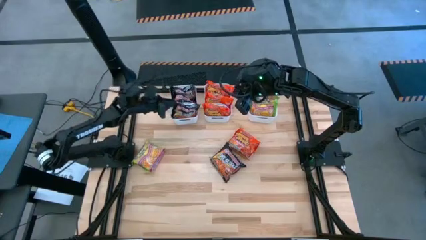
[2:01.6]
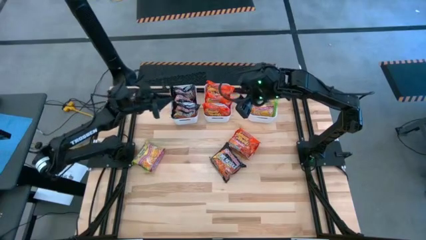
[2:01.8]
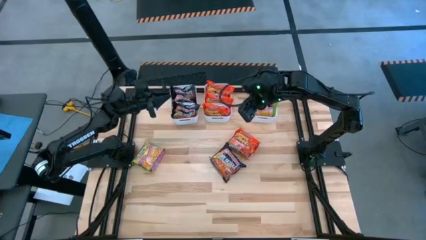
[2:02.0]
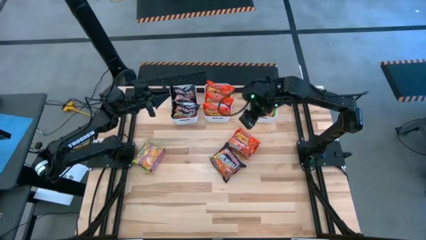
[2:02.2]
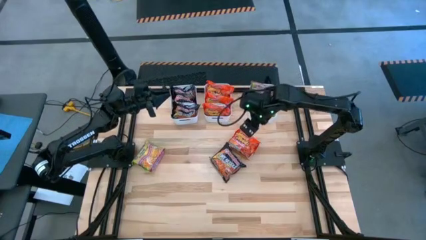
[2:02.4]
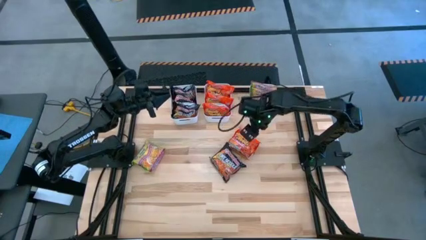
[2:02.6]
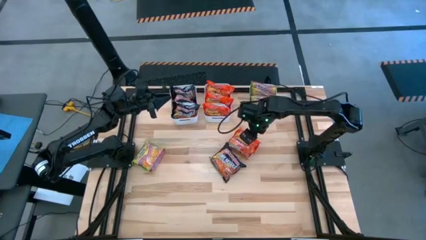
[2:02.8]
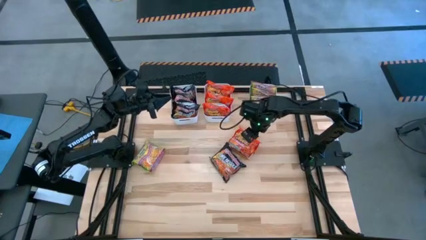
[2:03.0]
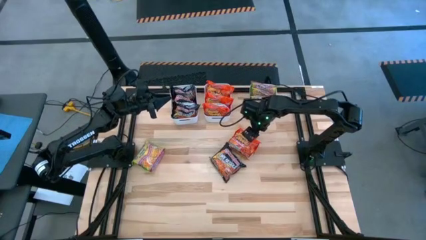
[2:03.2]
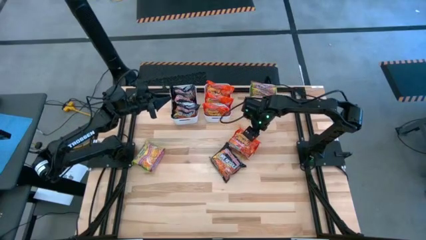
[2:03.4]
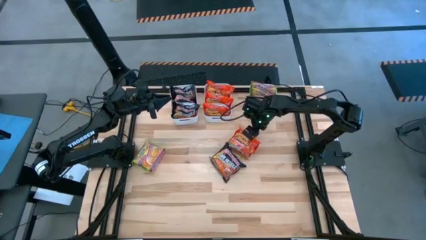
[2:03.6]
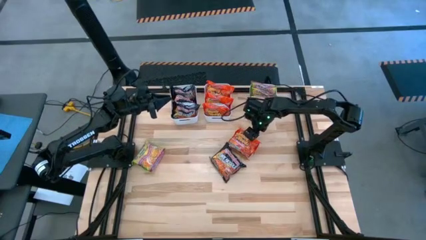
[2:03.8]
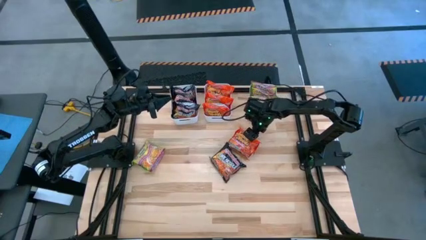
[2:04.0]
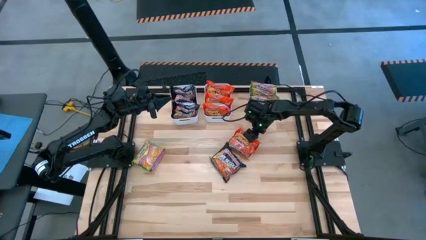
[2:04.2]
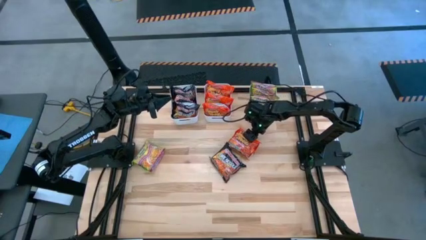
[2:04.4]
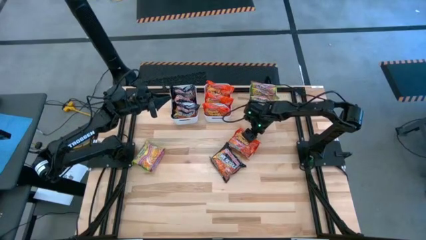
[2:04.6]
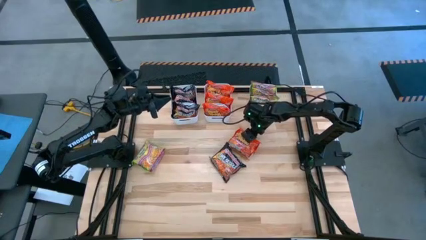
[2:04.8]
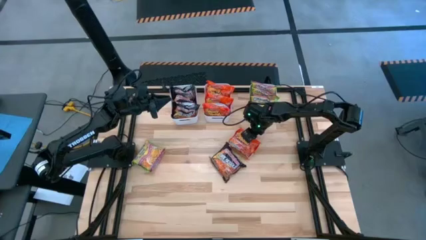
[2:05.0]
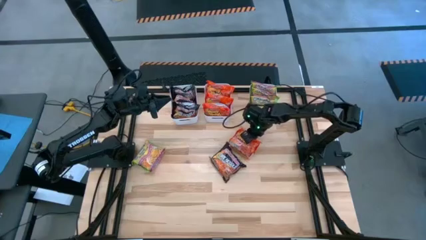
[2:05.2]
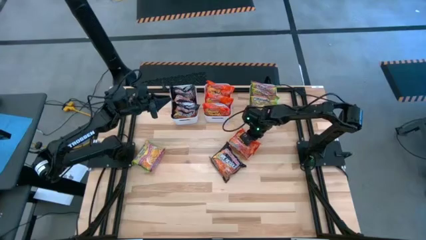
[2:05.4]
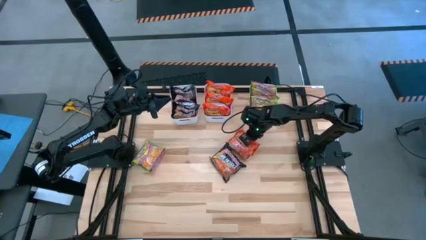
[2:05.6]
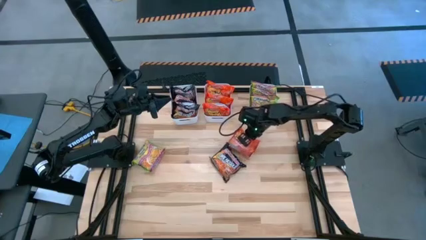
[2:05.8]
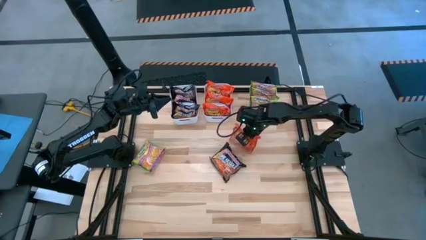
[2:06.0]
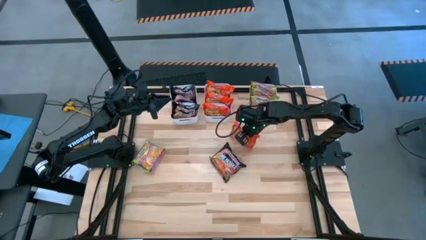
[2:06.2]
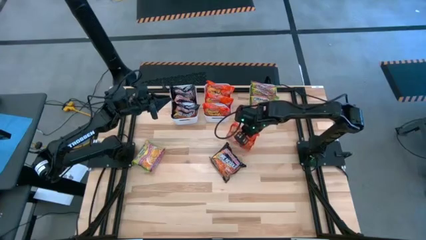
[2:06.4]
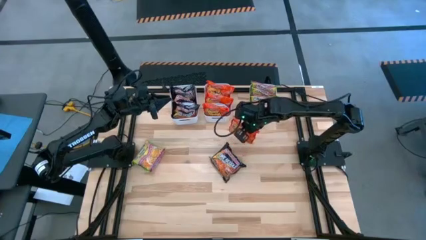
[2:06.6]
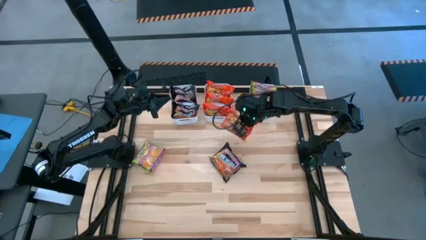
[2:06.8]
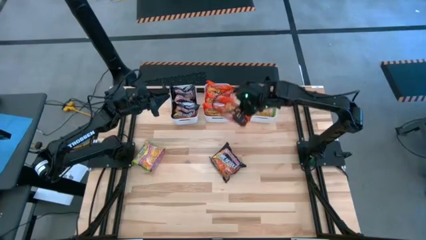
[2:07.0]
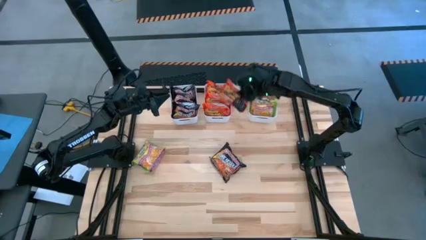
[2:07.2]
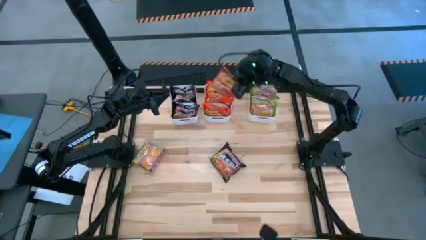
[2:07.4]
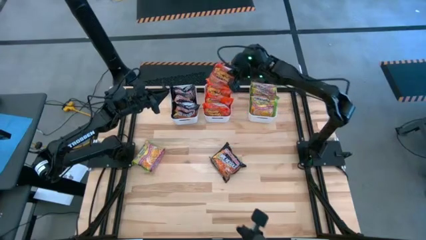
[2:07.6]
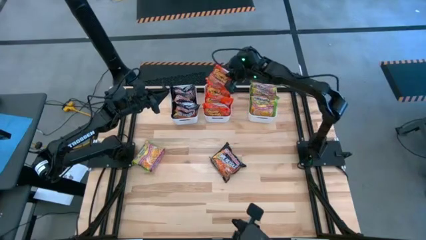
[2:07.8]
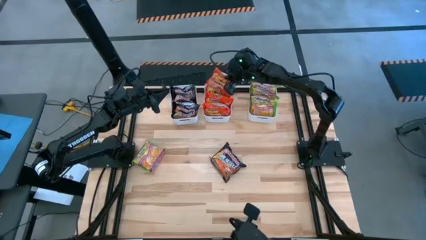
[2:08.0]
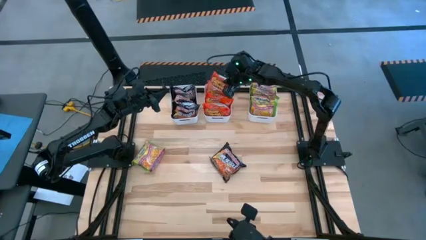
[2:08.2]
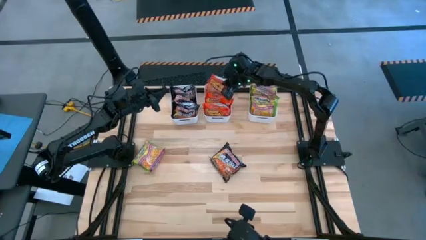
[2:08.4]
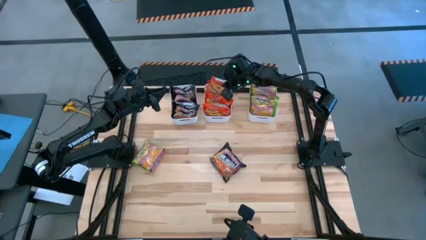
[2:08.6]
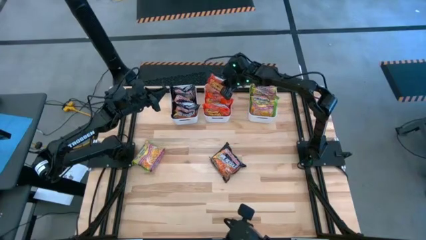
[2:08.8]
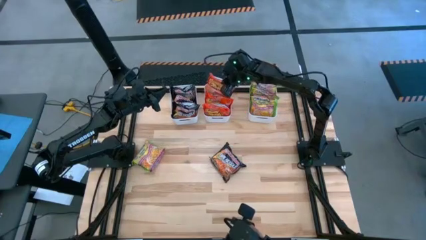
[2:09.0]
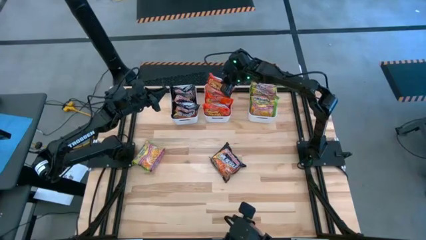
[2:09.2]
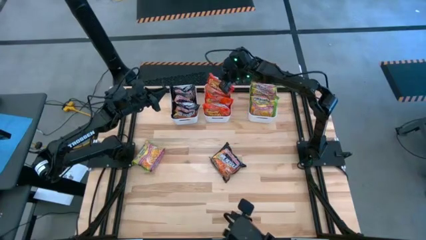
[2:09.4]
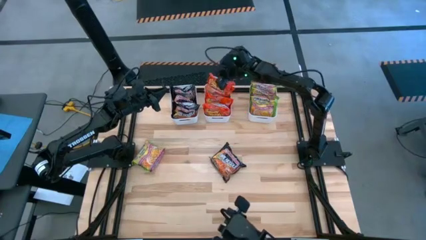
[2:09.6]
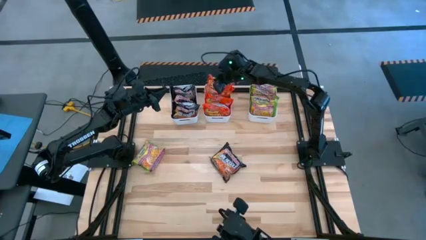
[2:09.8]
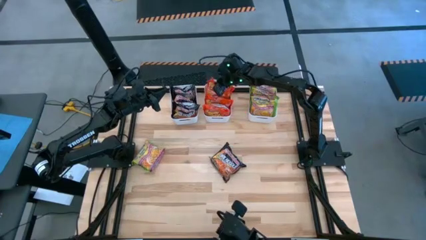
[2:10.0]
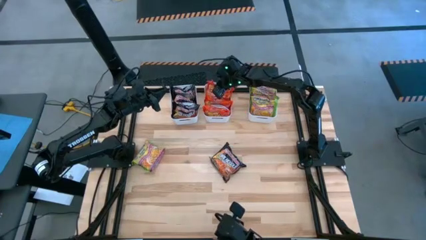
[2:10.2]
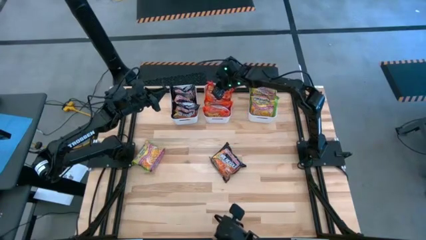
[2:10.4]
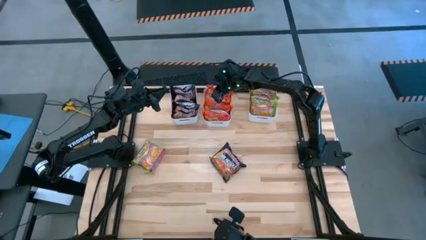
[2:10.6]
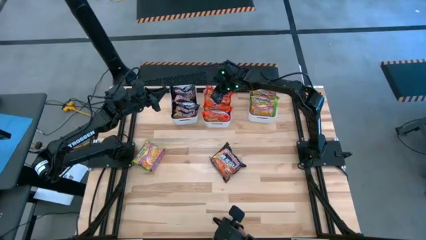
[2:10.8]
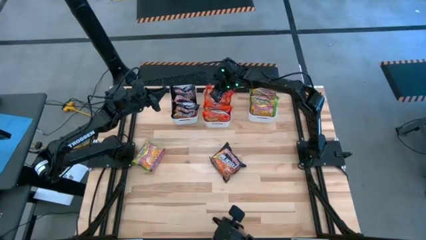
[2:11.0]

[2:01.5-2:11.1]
Task: Sort Maruchan noodles
Put the orange noodle pack into the middle white bin

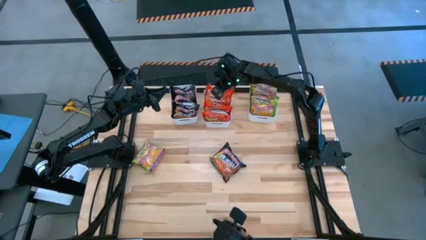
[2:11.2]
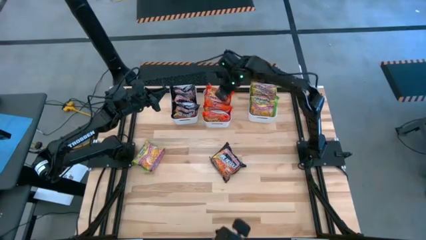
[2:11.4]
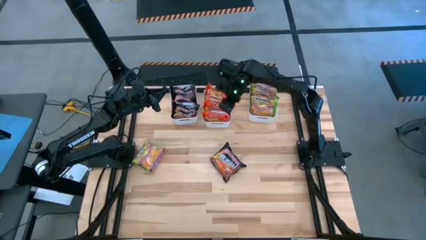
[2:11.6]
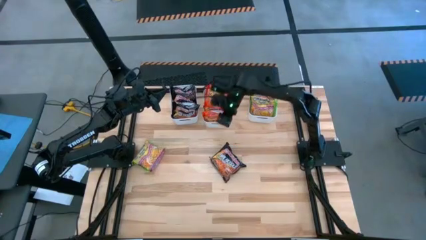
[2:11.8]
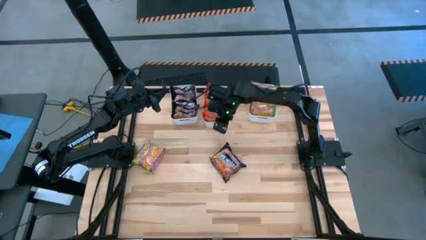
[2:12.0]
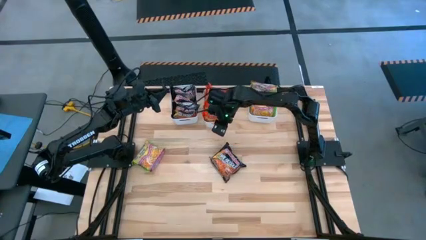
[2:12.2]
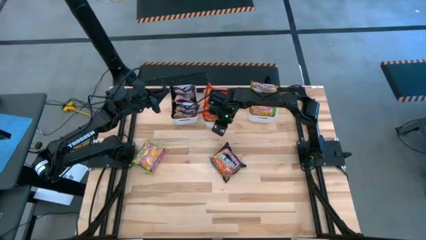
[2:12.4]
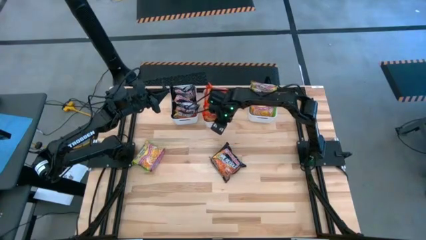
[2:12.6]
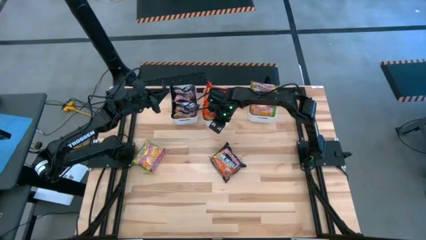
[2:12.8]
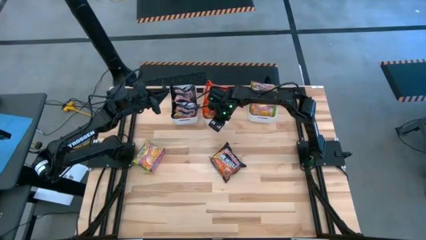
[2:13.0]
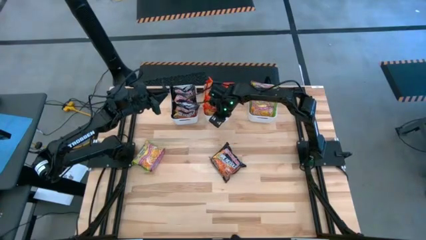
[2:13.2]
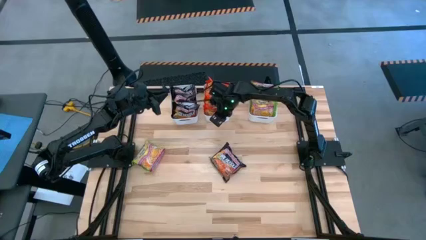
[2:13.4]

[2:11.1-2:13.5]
Adjust the middle white bin on the table
